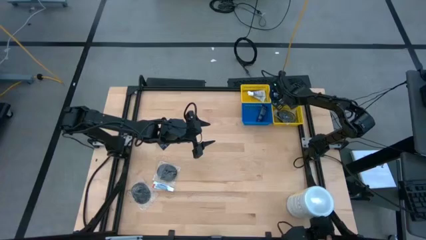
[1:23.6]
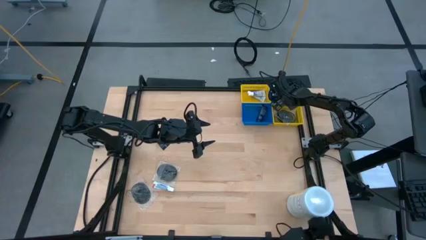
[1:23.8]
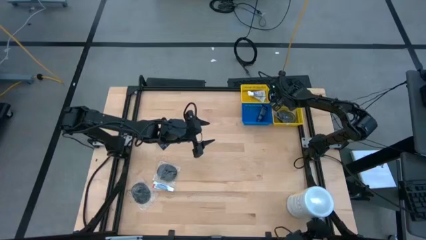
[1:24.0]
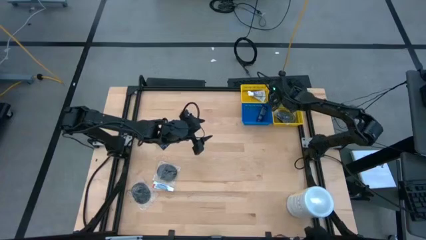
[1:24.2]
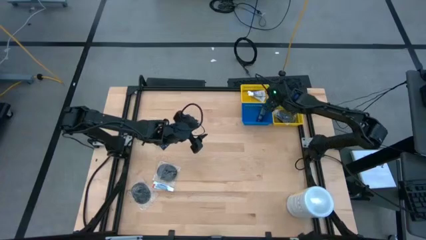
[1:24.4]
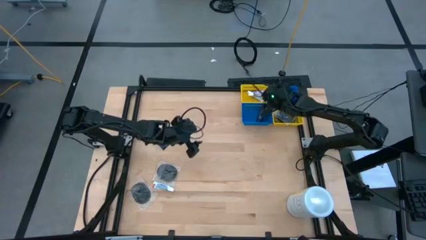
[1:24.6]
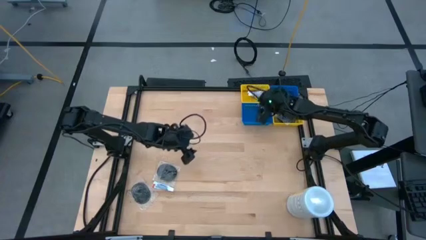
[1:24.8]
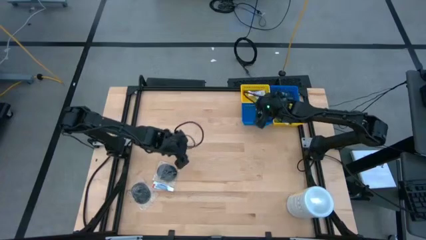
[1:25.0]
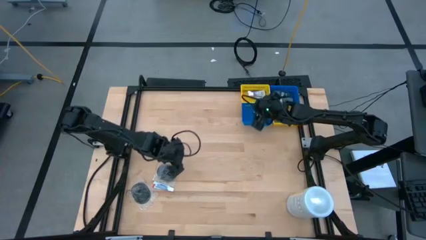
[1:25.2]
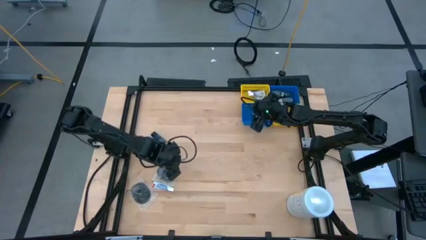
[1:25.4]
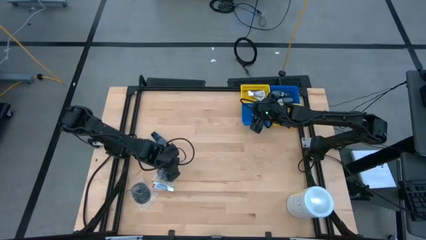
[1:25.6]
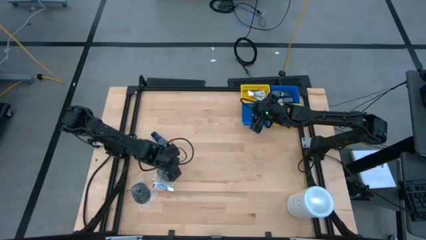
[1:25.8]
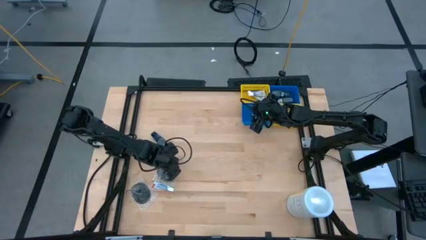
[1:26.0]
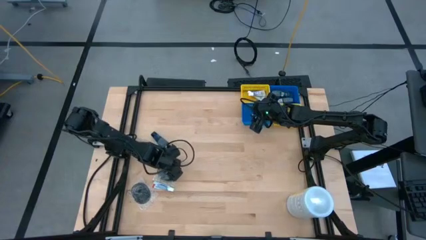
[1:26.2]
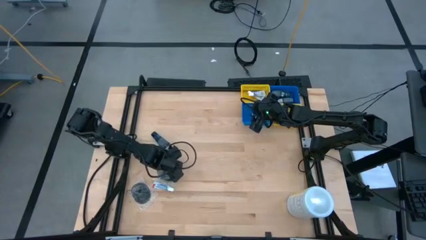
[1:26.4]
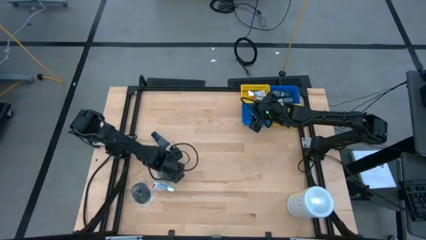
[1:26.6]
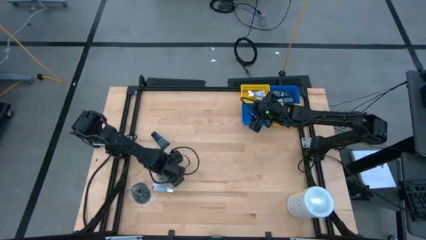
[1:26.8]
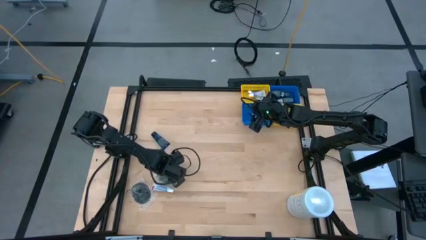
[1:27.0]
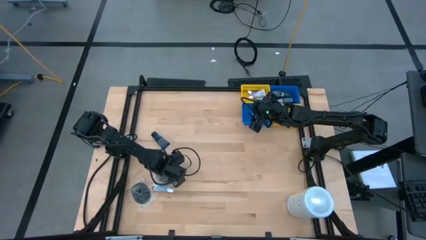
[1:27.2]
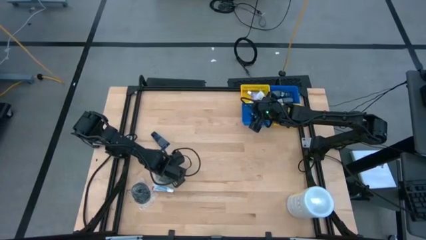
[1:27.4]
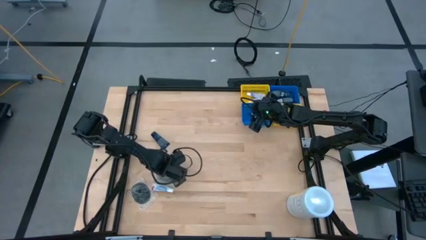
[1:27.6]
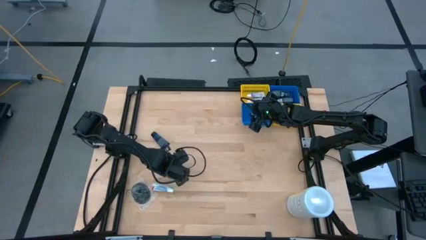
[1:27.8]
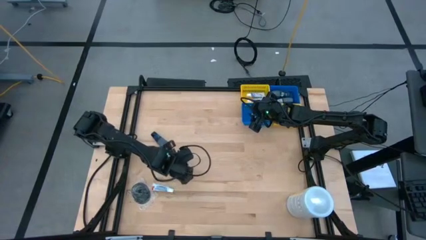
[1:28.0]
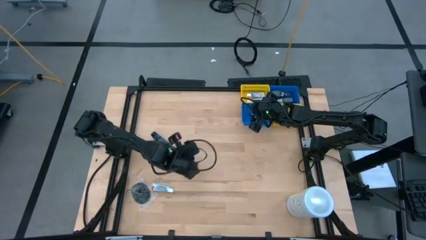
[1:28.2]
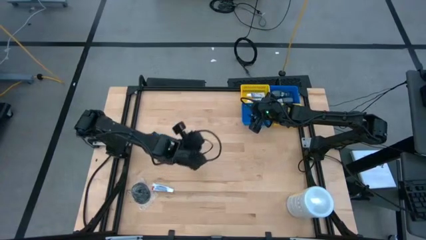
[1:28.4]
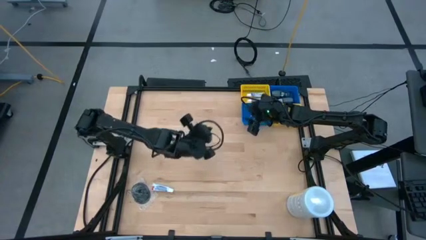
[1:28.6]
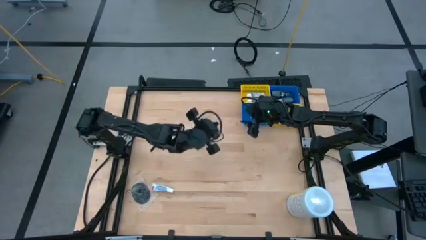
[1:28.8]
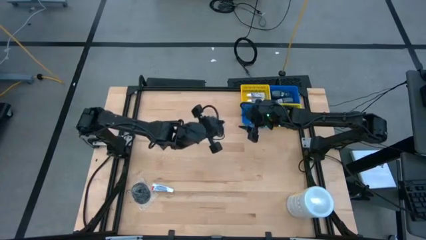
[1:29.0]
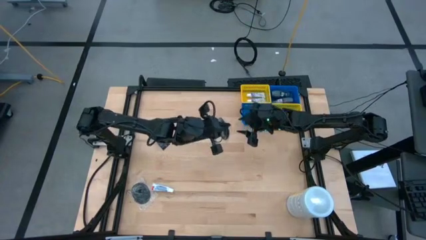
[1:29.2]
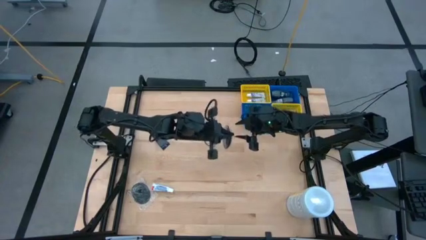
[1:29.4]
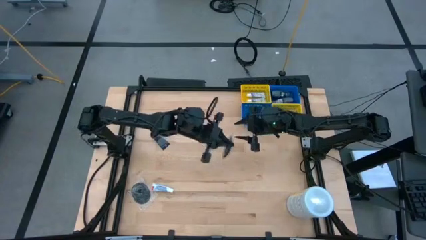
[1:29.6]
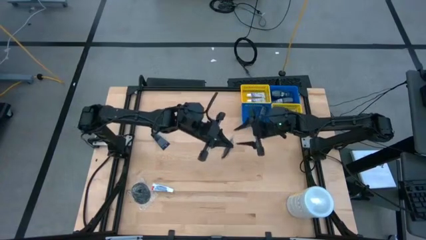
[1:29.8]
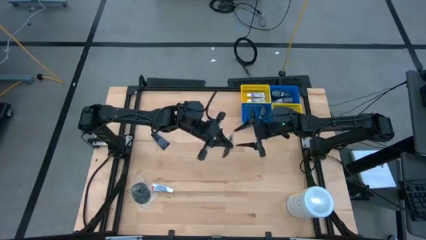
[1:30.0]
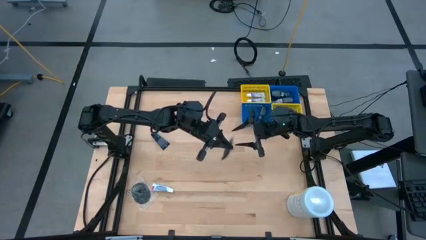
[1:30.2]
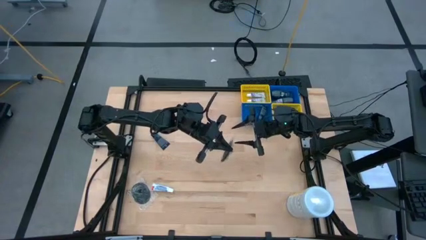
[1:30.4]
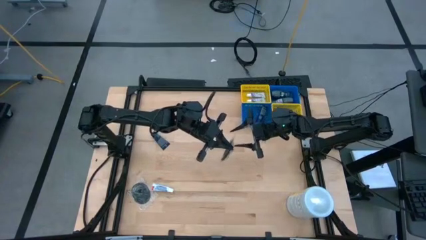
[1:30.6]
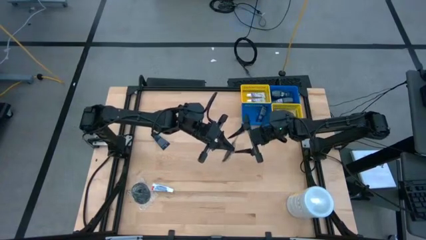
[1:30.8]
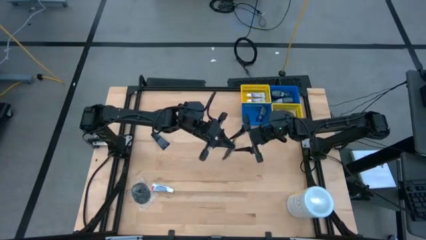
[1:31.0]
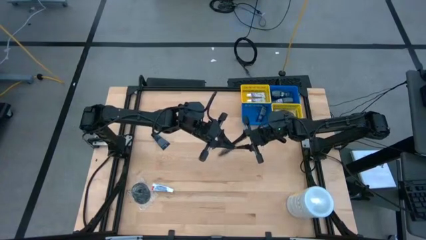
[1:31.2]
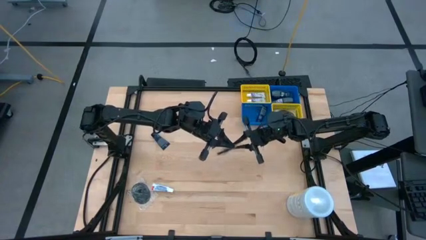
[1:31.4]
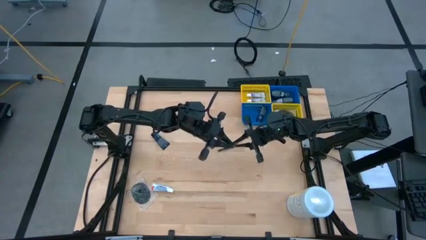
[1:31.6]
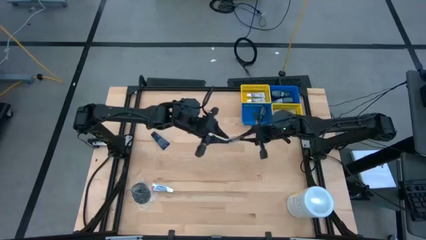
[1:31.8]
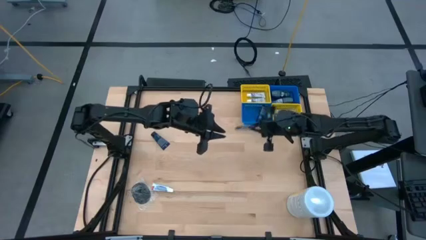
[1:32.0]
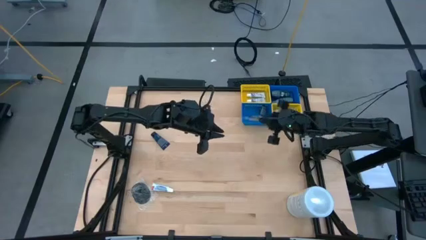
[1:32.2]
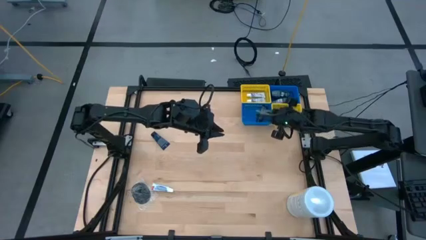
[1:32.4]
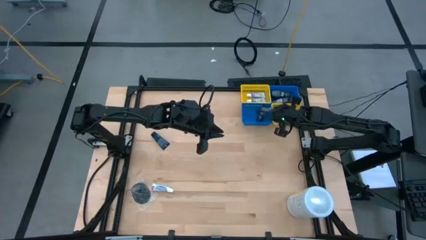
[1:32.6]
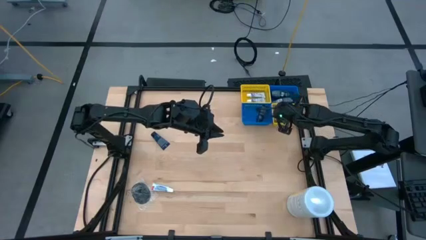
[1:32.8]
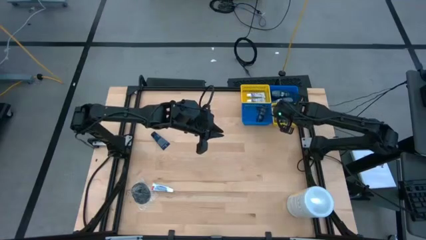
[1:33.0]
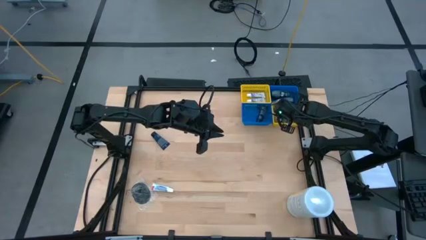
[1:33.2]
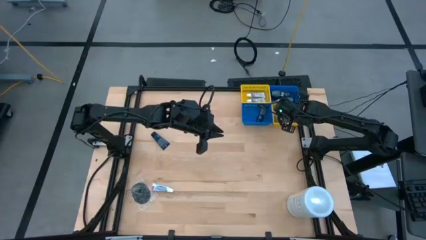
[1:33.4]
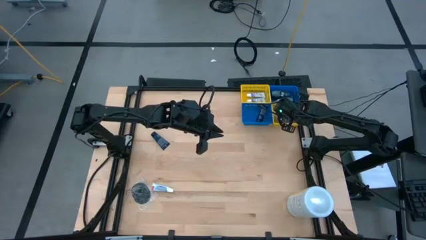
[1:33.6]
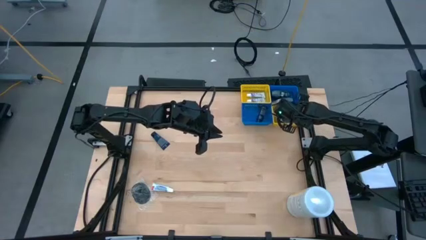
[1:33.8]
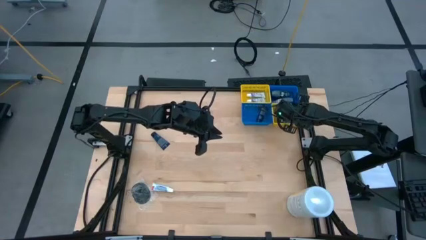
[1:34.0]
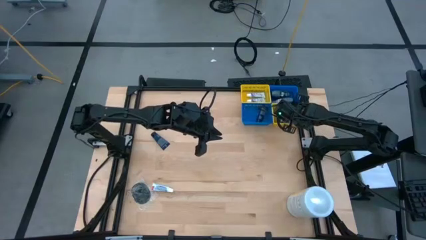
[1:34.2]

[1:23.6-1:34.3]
Task: Pick & Place Travel size toiletries
Put the black hairbrush into the right yellow basket
